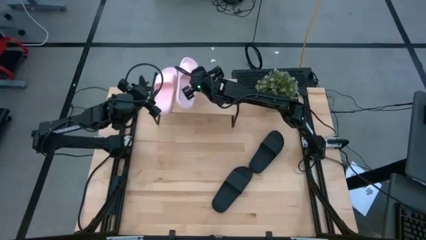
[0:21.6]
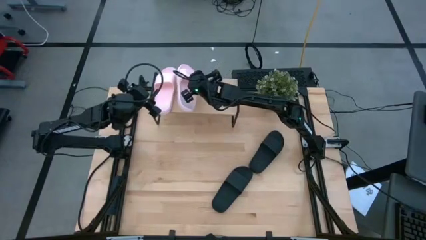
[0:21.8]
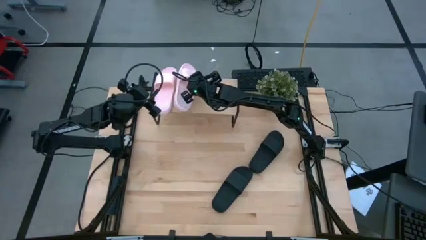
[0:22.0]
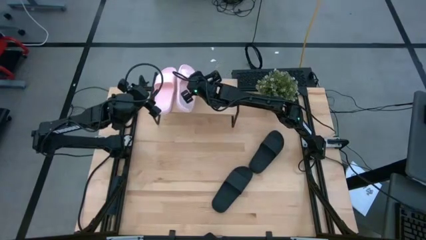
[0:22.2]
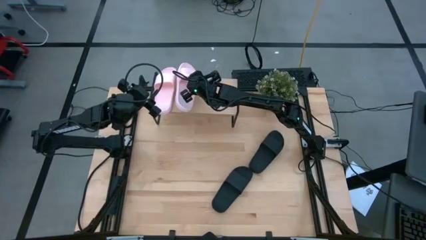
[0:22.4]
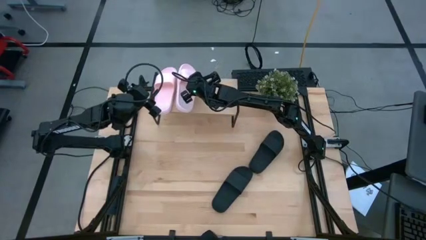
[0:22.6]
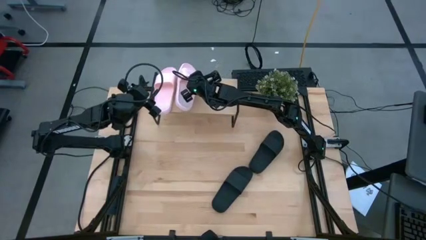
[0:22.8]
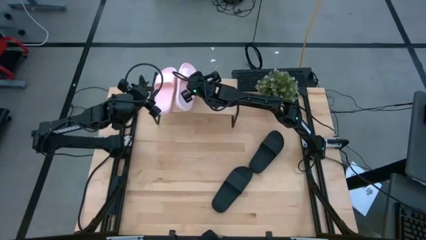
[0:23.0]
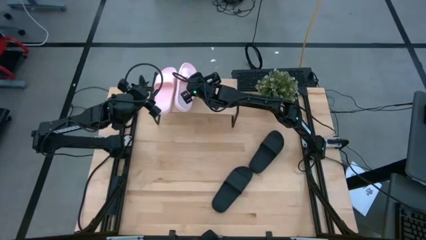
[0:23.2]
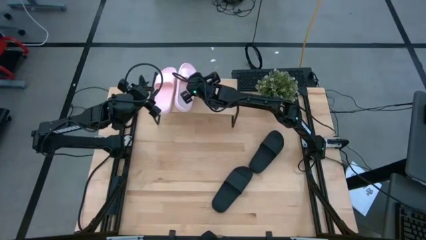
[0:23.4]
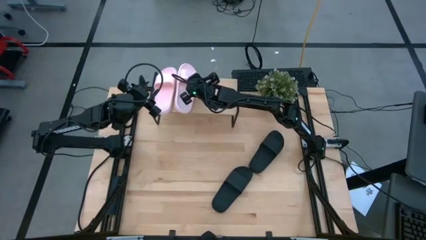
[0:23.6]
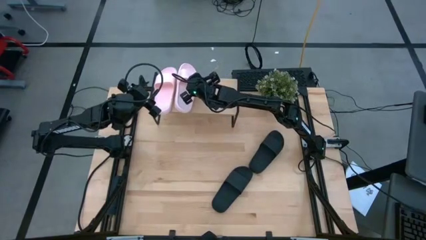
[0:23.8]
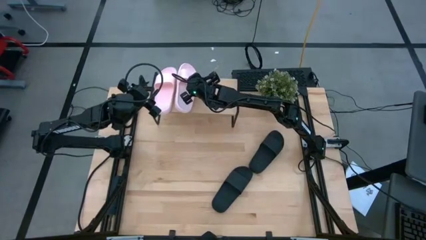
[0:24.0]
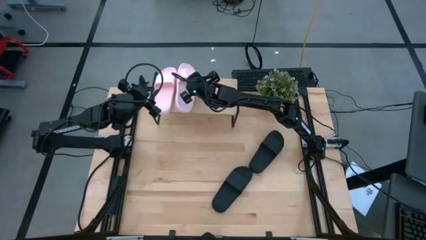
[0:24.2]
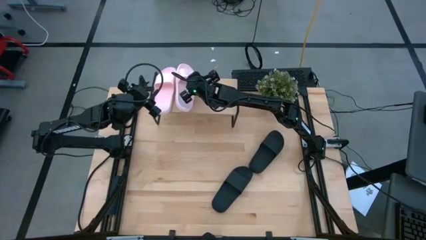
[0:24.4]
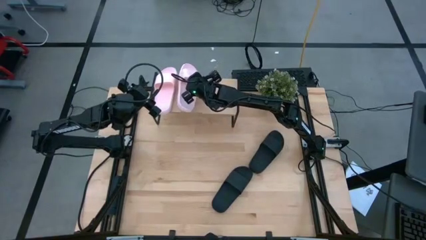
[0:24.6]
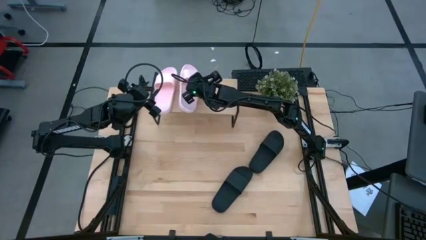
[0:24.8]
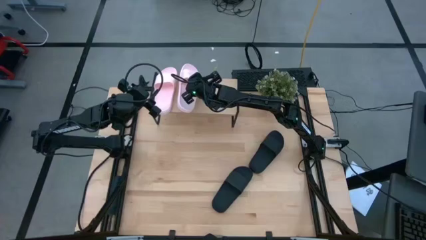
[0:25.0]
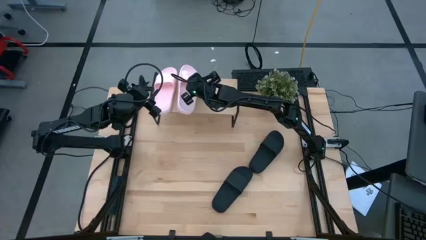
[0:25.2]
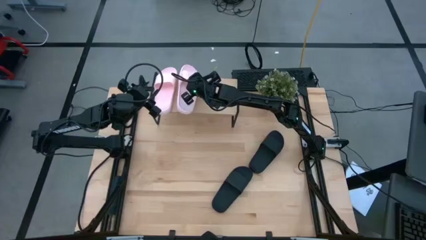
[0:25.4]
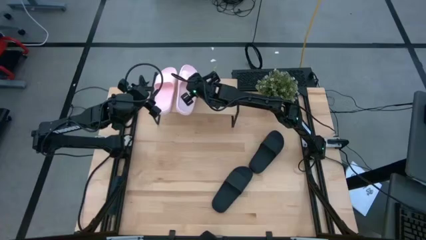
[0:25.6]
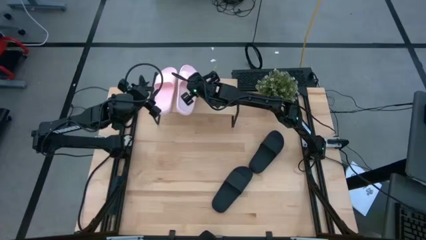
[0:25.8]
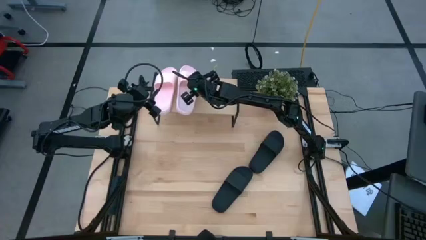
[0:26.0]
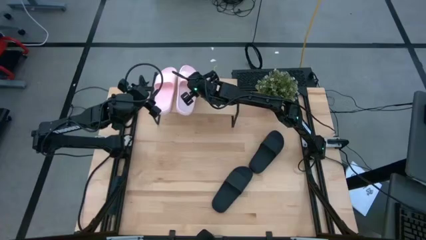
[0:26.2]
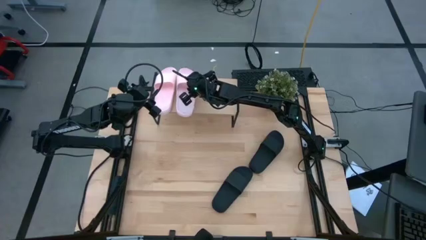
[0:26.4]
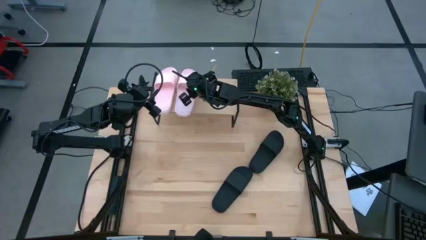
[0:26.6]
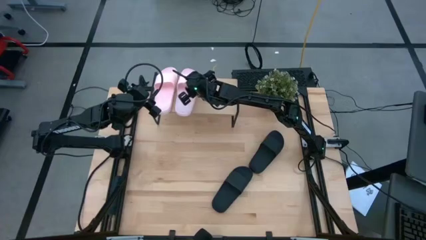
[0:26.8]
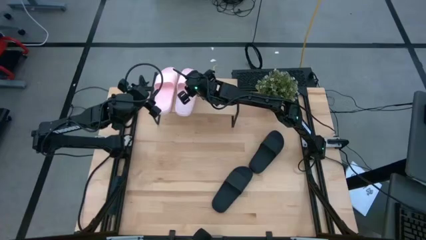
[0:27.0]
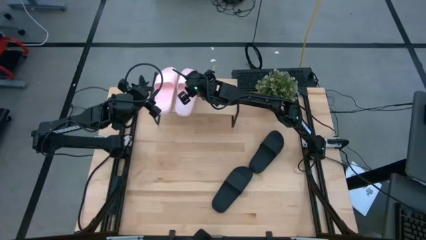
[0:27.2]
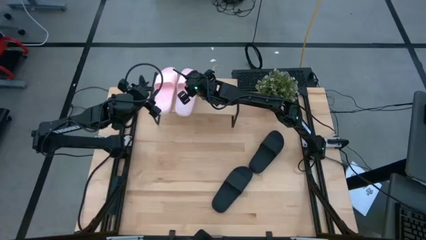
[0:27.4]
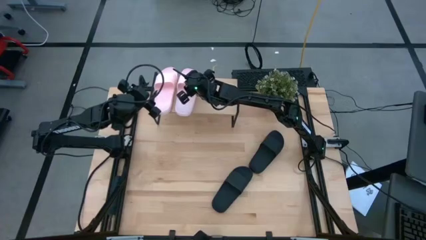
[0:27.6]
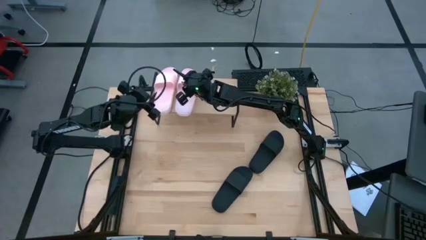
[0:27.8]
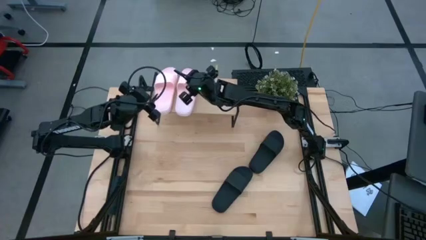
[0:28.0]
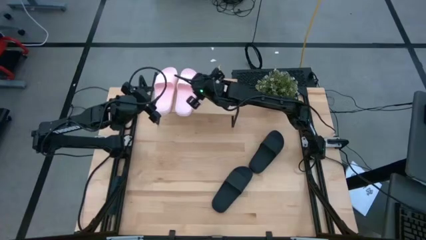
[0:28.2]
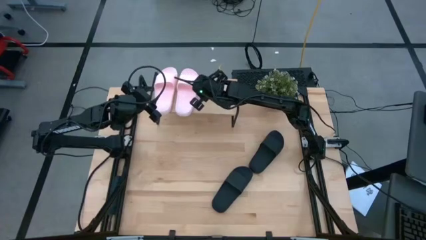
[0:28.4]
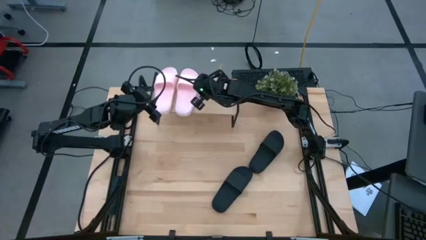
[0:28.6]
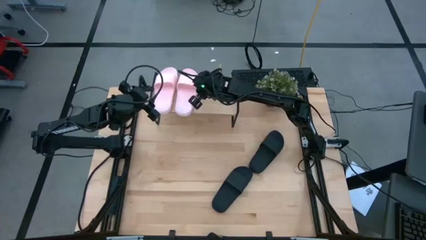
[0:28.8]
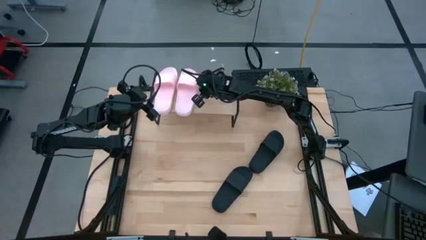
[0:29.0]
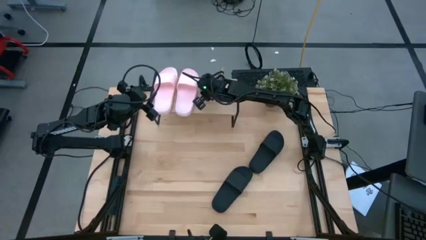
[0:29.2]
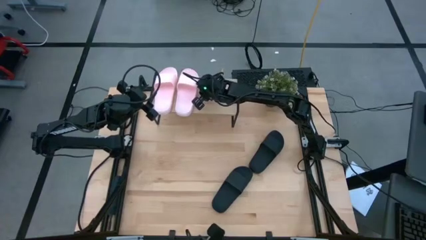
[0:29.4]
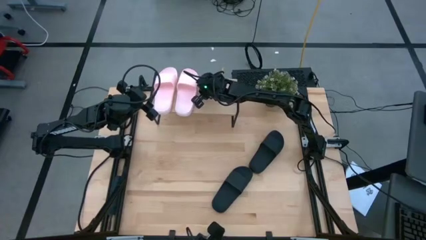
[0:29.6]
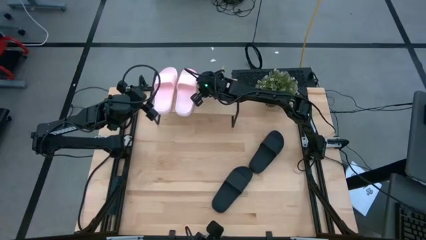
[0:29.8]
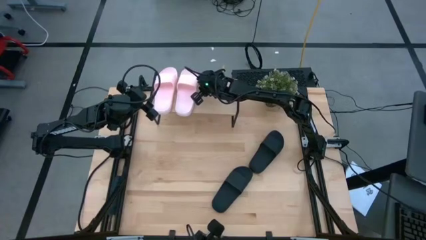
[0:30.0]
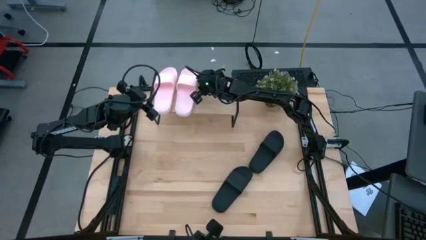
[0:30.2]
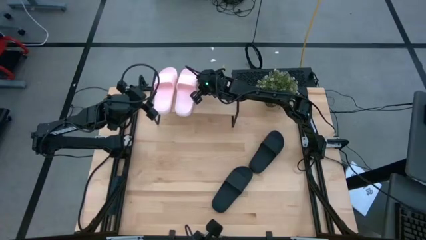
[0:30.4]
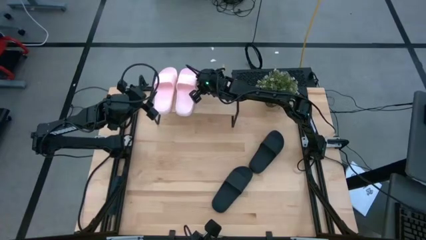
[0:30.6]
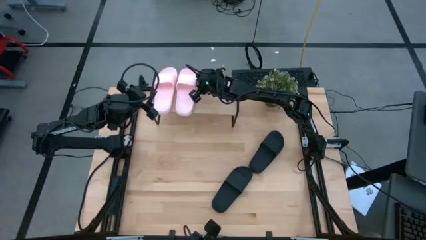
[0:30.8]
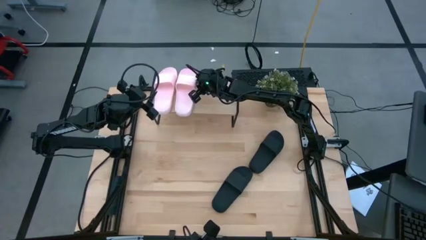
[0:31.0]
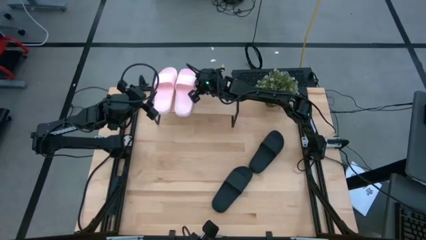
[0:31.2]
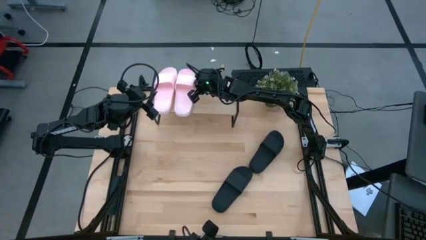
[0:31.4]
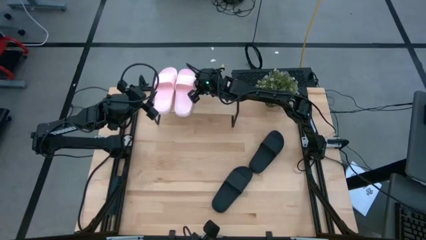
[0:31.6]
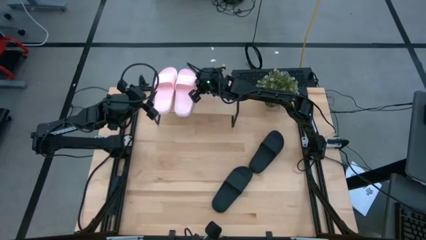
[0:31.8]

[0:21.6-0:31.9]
Task: Pick and place slides into the shelf
Put the pink slipper on the shelf
